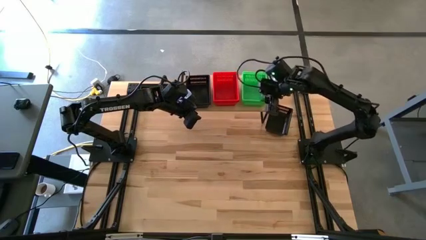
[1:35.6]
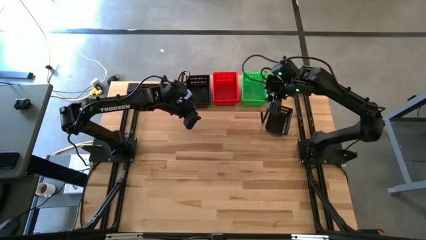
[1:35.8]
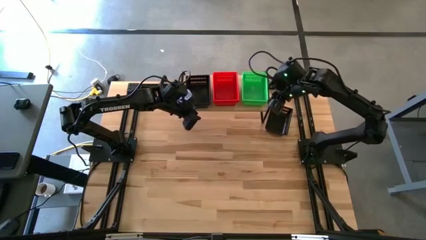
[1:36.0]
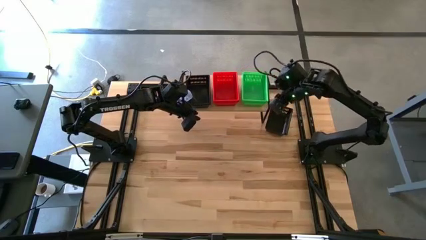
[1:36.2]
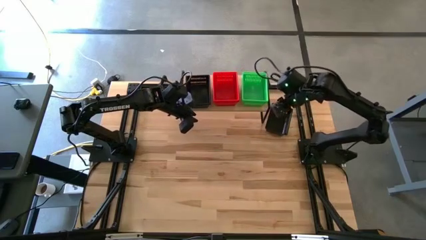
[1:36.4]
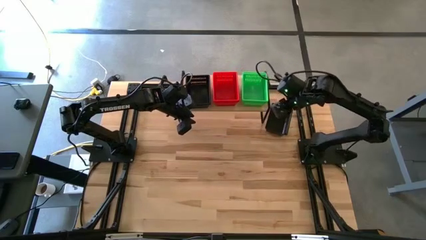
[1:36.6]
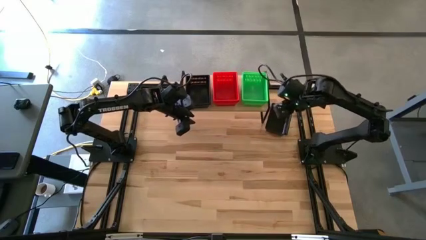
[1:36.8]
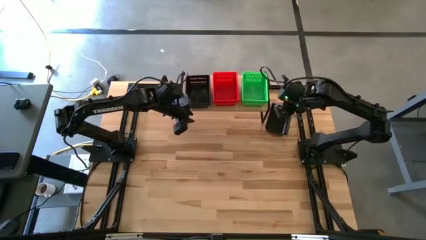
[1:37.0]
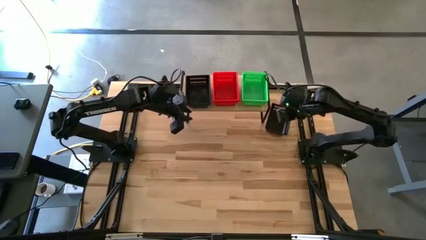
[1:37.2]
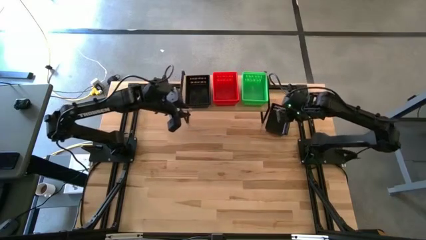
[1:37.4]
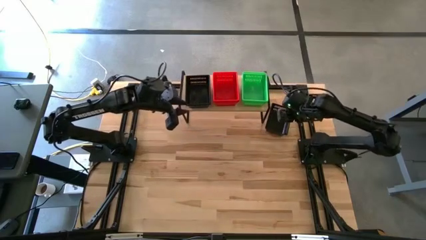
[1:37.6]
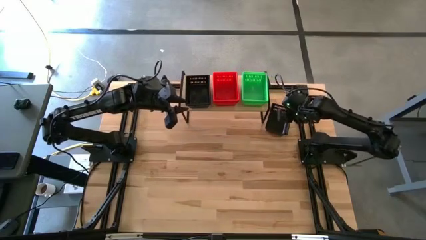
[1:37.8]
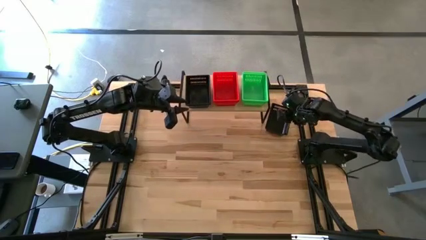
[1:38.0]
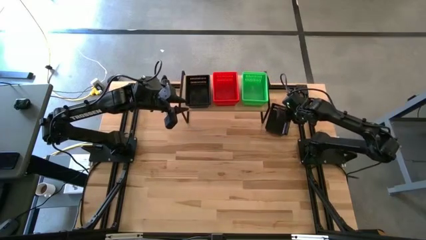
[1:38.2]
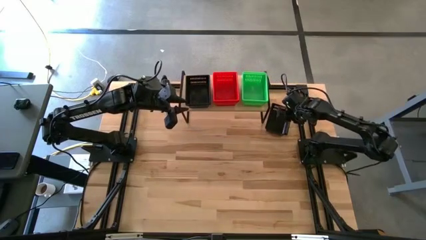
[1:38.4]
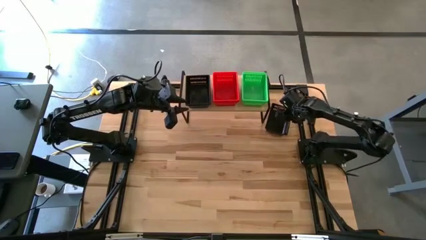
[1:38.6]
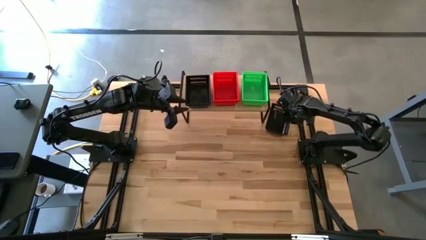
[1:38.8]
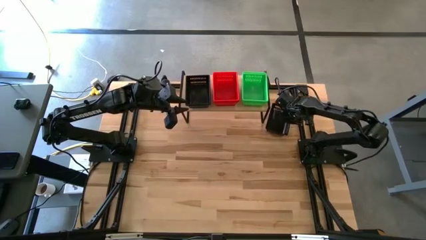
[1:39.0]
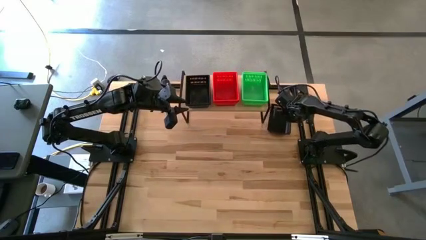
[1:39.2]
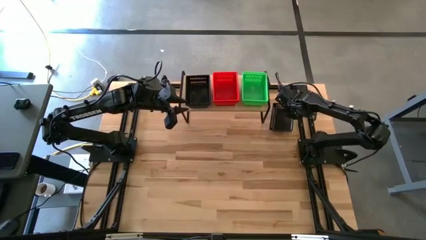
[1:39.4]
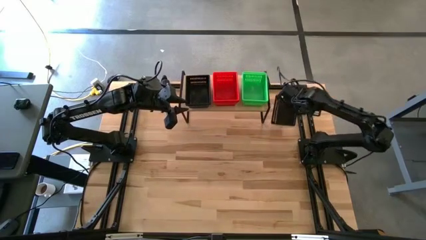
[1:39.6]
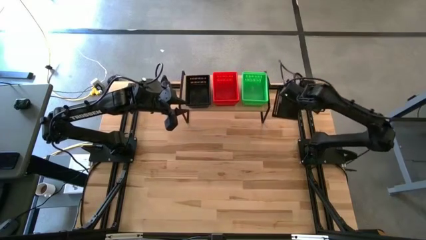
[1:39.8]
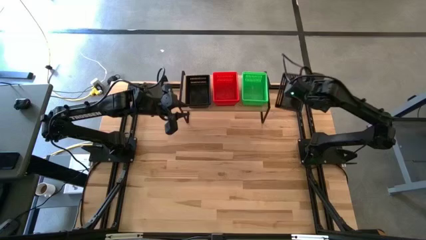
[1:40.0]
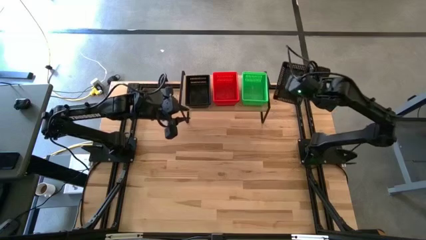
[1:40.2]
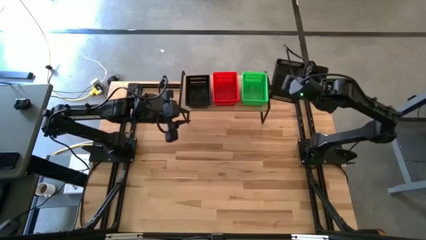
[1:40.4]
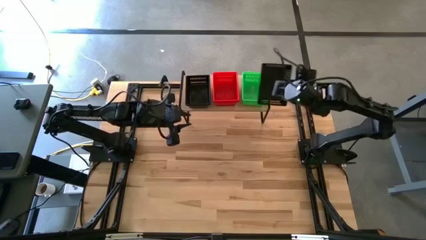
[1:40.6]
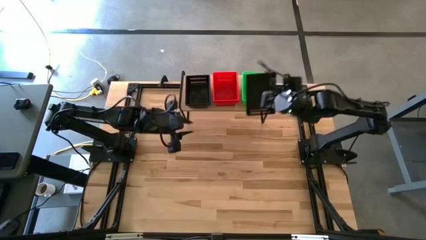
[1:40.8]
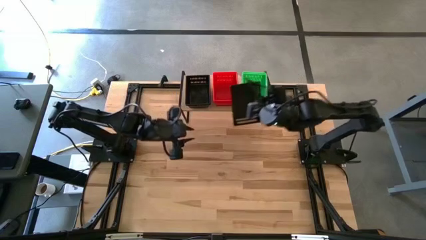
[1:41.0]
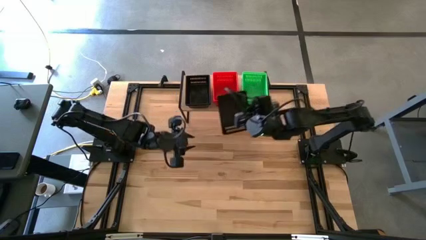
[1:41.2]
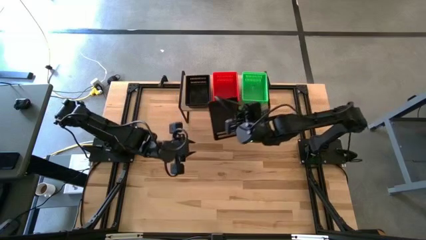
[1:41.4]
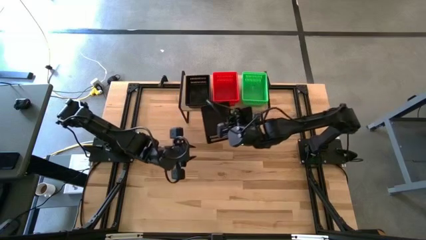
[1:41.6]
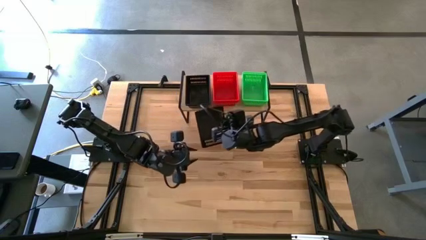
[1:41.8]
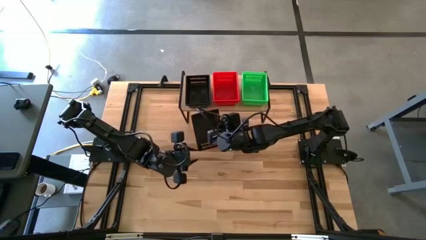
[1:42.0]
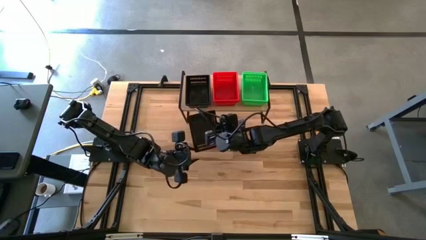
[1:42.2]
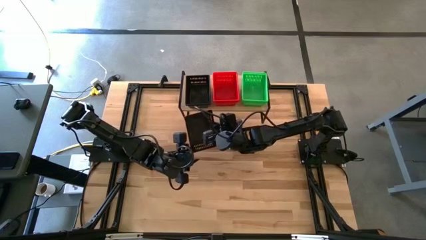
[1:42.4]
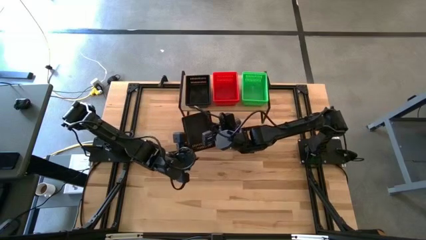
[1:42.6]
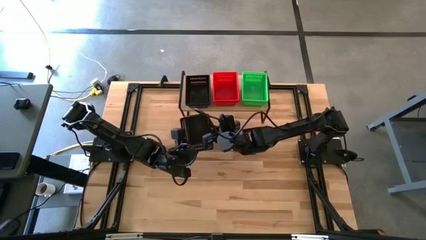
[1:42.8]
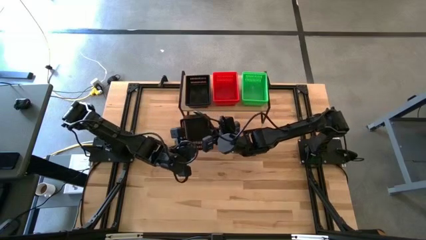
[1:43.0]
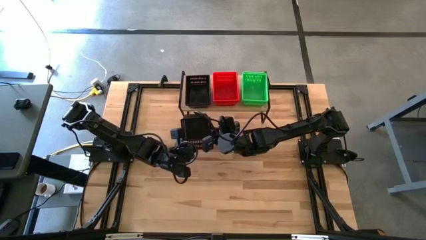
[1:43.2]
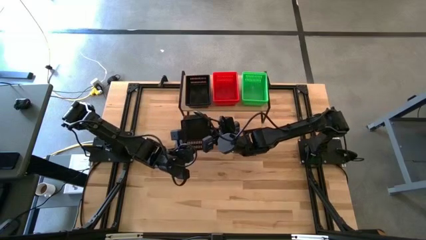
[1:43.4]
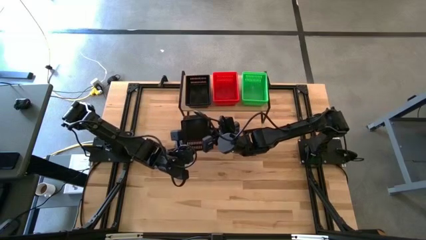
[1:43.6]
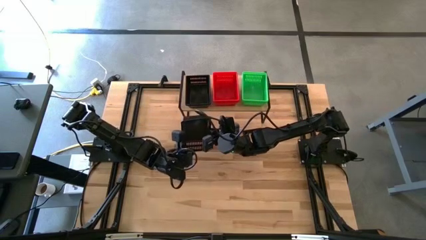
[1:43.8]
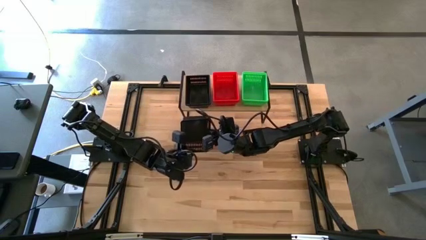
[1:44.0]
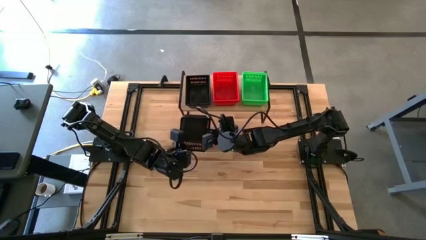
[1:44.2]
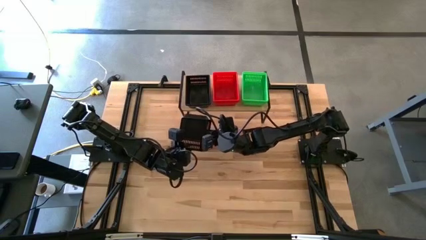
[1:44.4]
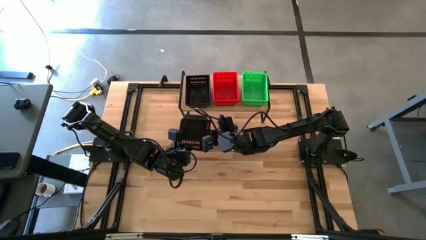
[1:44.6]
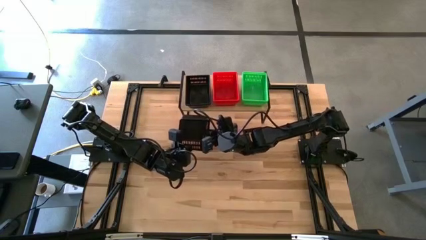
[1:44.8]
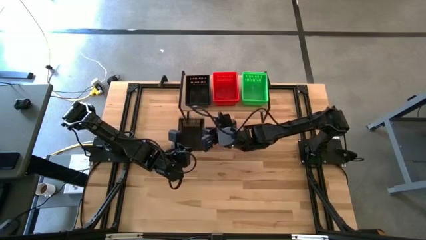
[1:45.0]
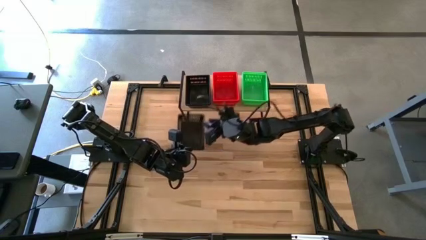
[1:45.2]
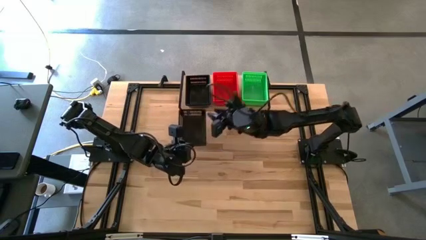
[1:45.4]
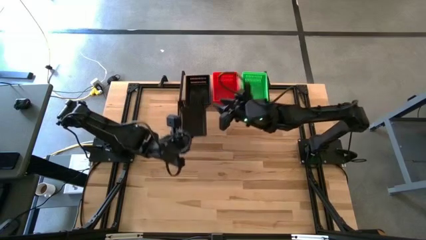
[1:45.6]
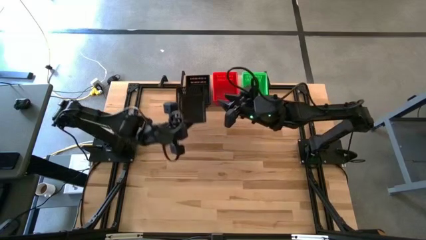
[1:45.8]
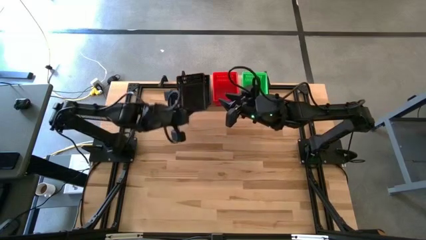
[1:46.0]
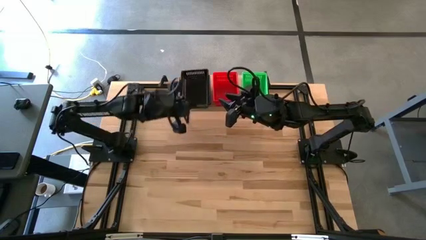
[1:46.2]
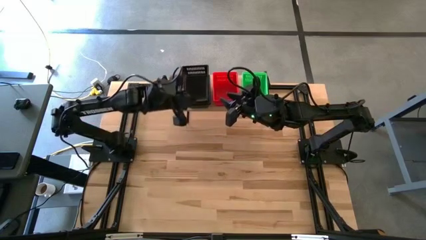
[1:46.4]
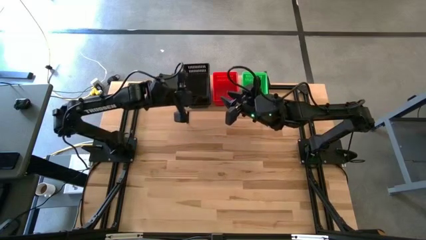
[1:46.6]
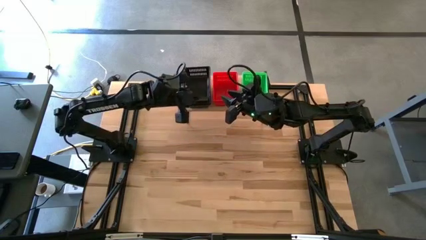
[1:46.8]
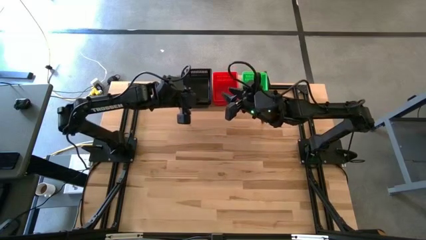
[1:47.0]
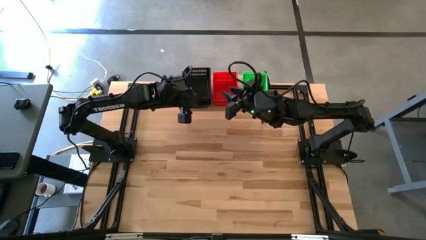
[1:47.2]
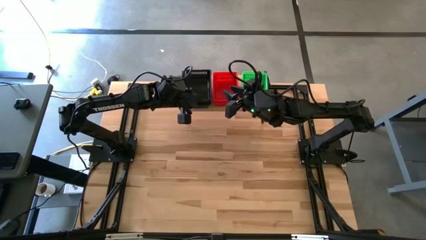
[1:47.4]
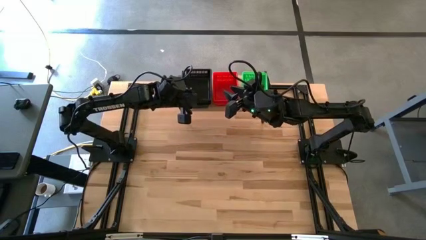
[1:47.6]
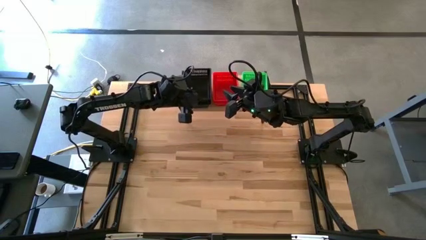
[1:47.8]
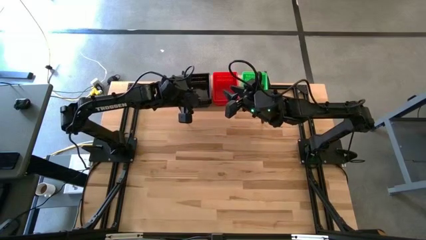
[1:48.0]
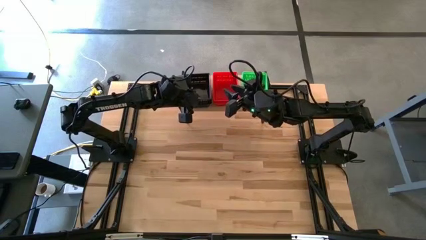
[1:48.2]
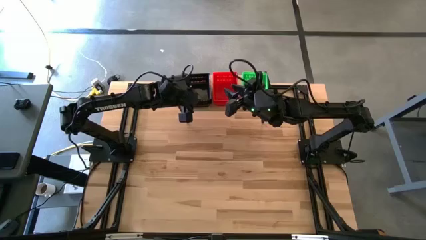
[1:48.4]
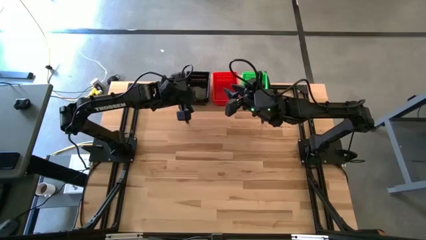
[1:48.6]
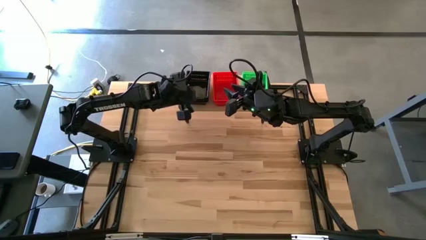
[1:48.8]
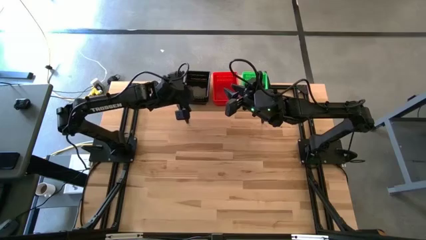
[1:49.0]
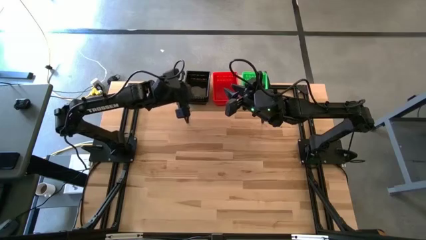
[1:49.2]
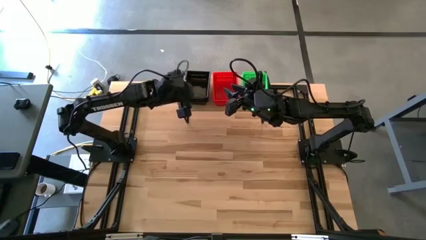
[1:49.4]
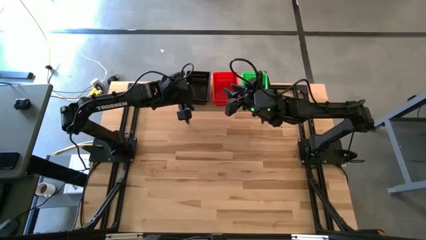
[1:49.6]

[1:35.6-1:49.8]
Task: Stack baskets on shelf by color
Stack the black bin on the stacked black bins on the shelf

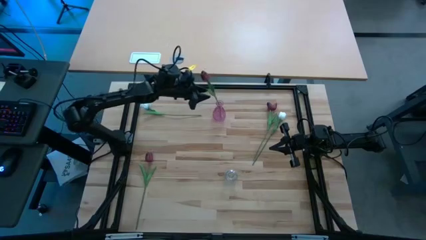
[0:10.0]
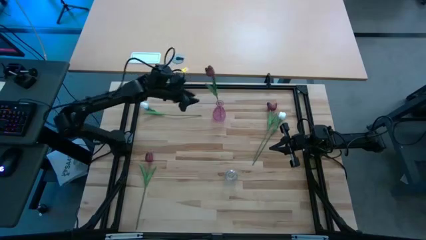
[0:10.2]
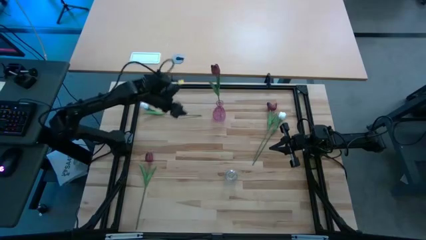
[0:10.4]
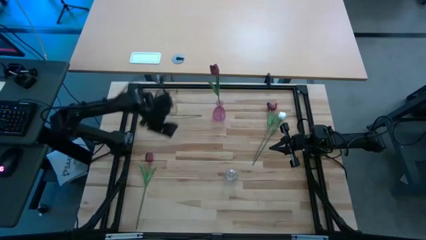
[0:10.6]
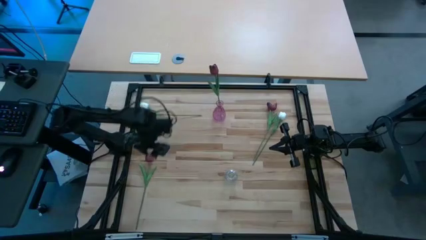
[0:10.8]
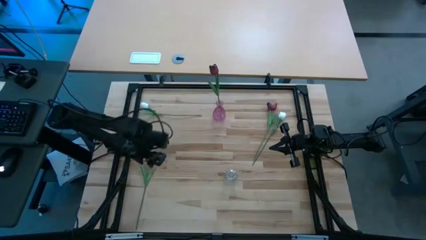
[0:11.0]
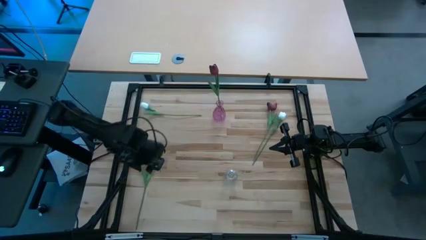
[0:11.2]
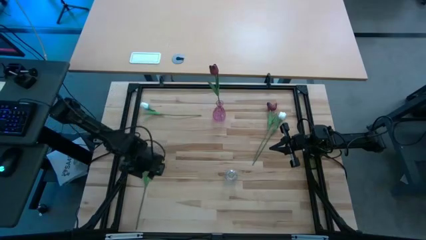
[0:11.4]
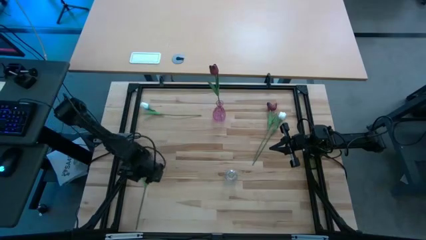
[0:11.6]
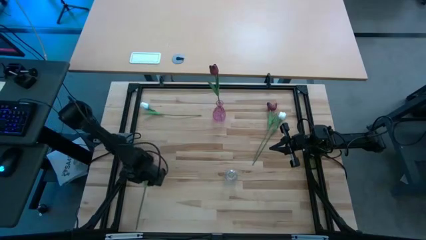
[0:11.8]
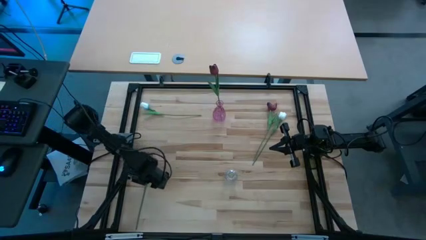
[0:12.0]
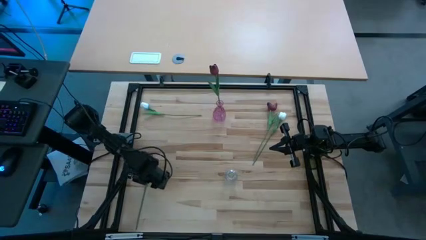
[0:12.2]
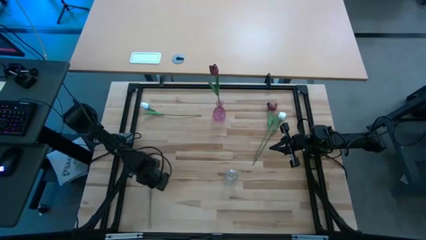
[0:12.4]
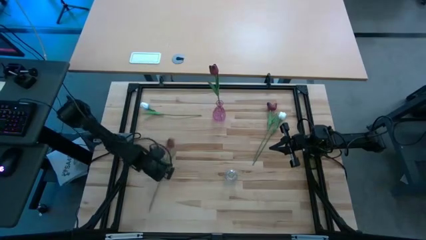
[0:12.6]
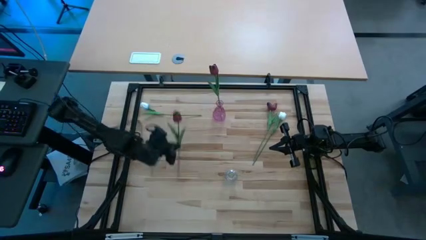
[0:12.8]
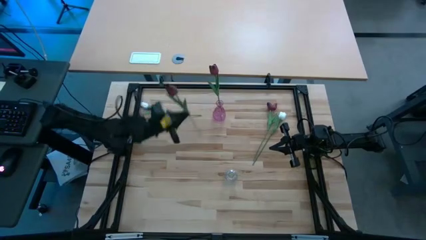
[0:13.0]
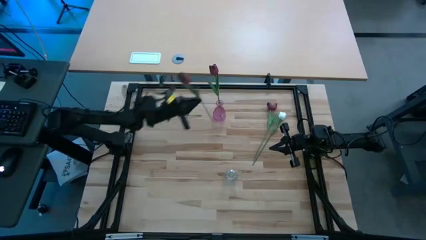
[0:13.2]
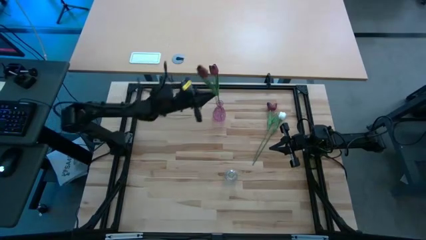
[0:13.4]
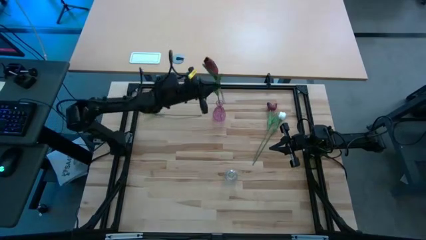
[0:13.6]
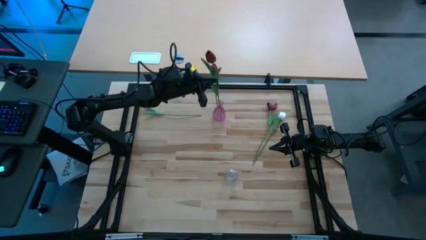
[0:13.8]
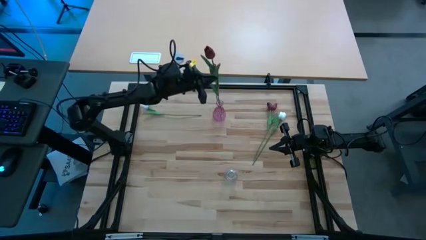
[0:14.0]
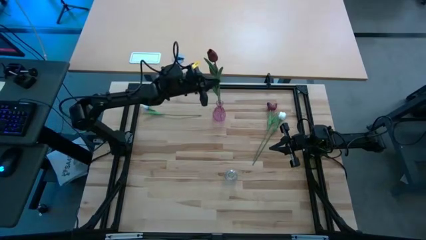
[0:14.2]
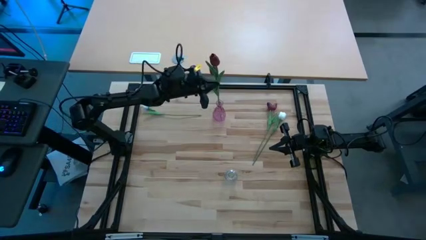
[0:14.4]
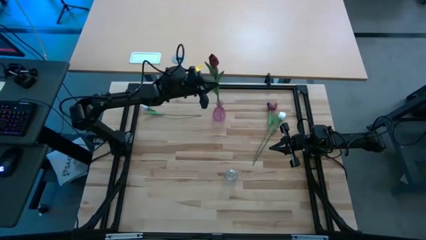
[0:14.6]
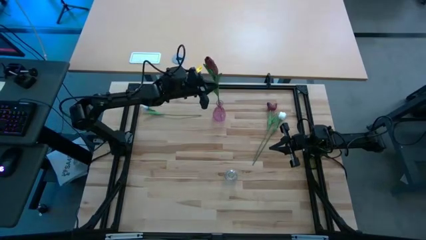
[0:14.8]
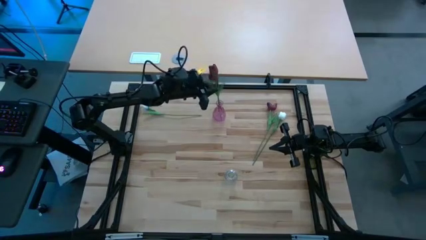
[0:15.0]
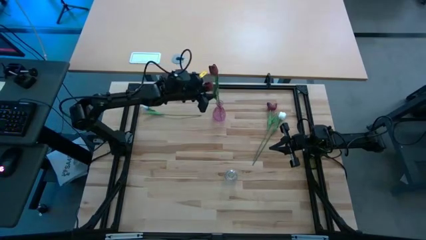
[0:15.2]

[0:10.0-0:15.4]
Task: Sort flowers into vase by color
Put the bottom red flower into the pink vase
